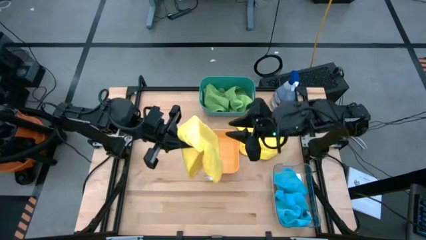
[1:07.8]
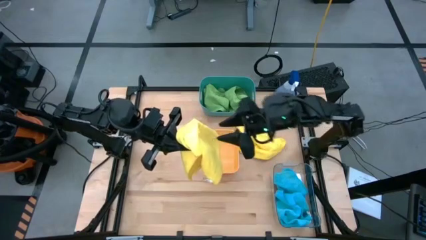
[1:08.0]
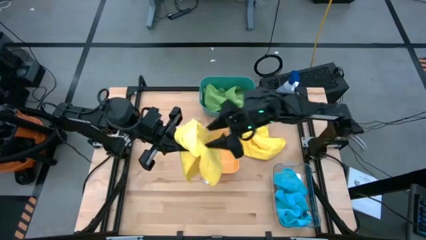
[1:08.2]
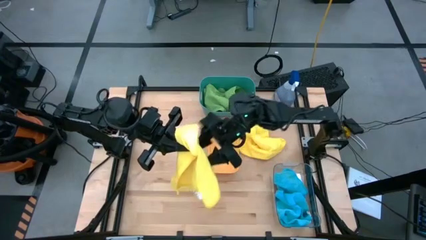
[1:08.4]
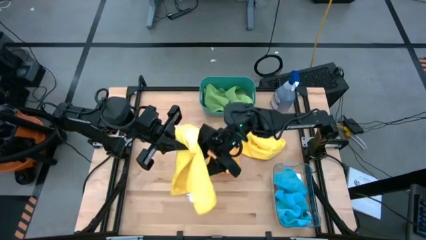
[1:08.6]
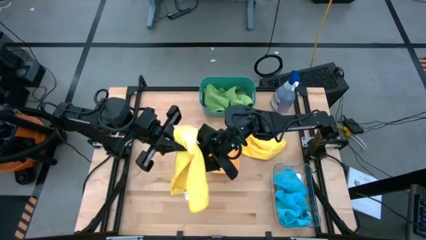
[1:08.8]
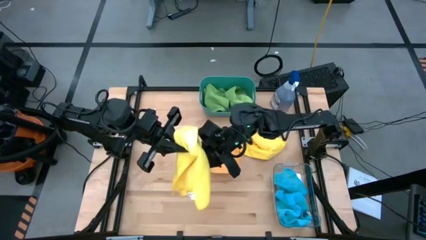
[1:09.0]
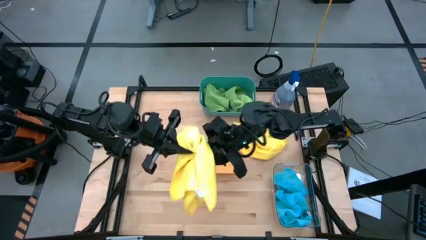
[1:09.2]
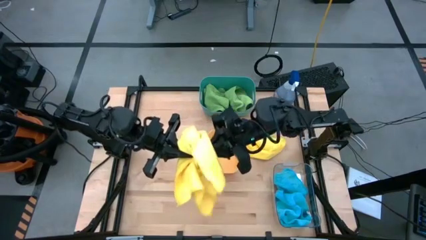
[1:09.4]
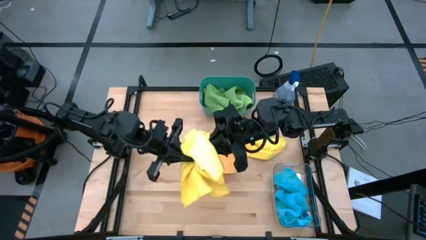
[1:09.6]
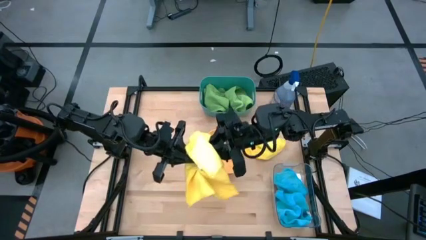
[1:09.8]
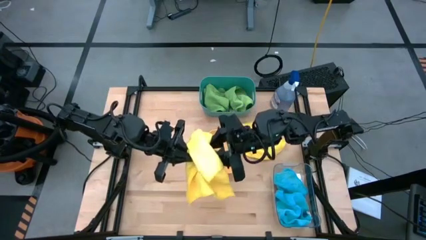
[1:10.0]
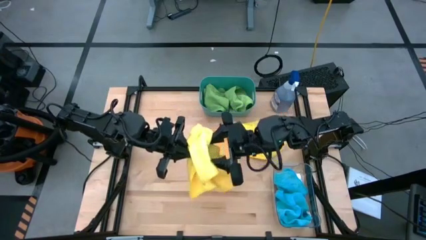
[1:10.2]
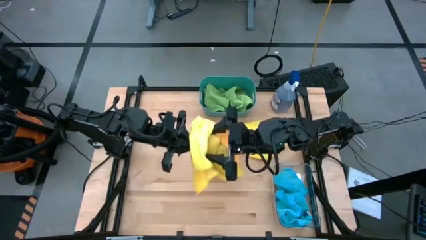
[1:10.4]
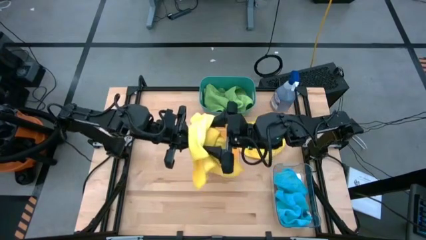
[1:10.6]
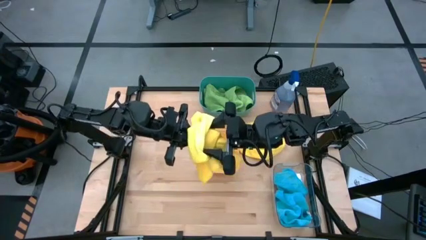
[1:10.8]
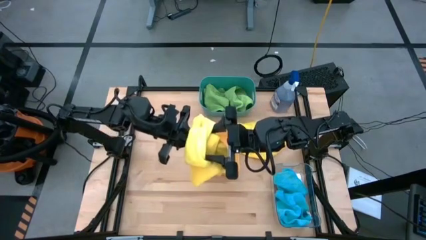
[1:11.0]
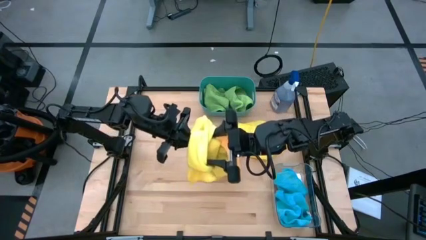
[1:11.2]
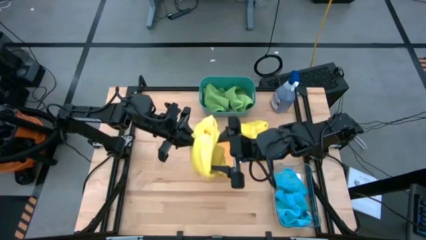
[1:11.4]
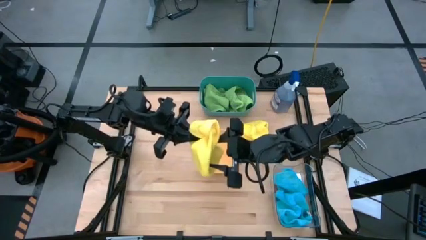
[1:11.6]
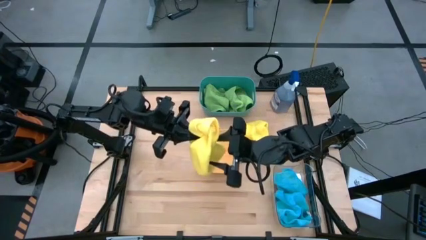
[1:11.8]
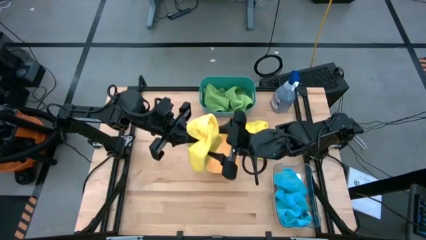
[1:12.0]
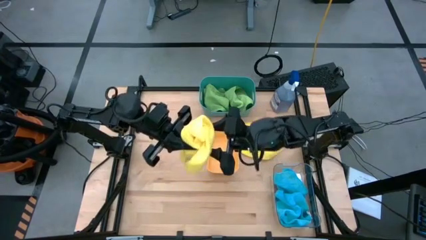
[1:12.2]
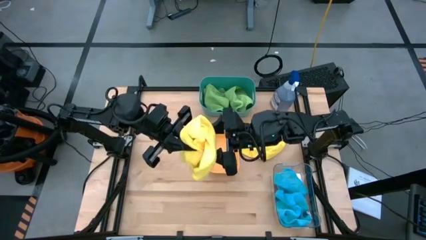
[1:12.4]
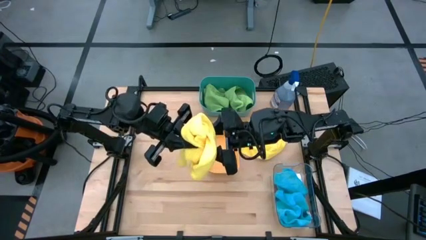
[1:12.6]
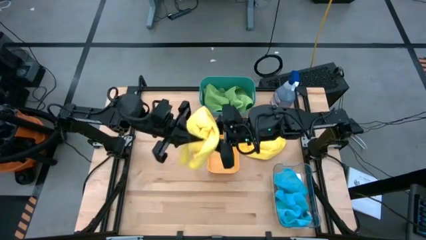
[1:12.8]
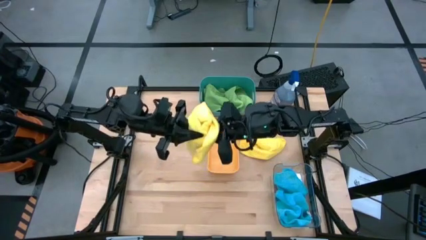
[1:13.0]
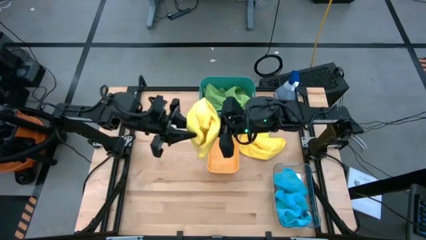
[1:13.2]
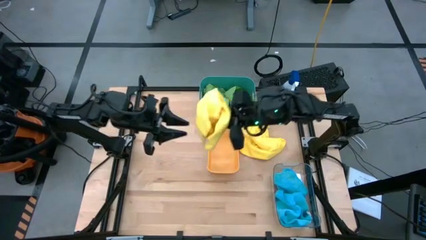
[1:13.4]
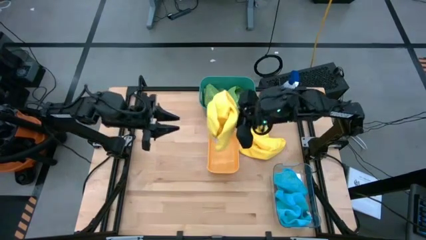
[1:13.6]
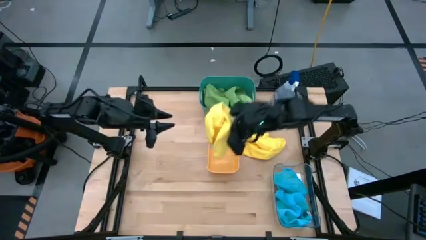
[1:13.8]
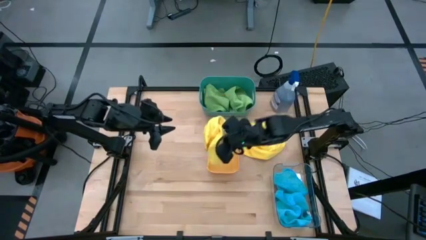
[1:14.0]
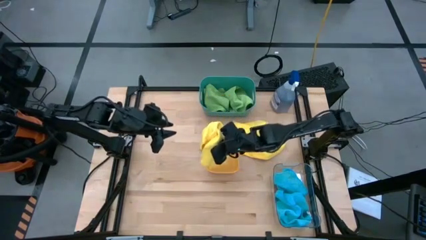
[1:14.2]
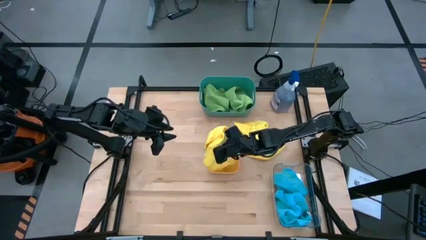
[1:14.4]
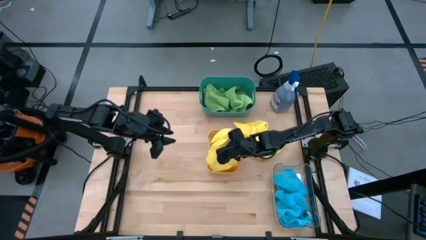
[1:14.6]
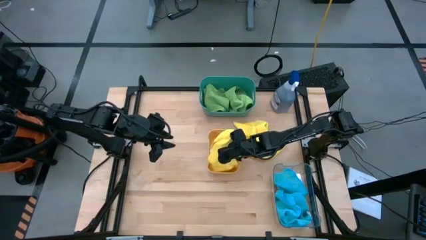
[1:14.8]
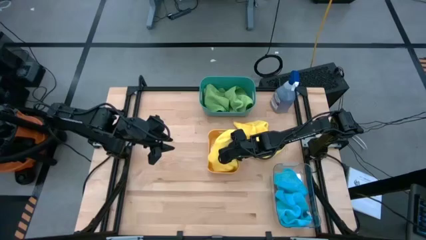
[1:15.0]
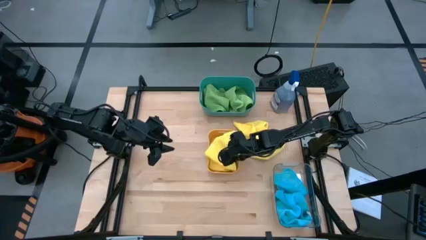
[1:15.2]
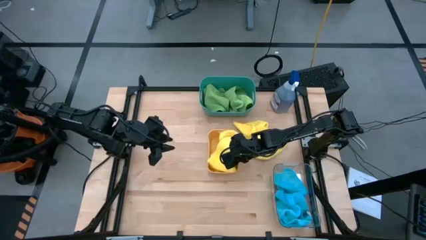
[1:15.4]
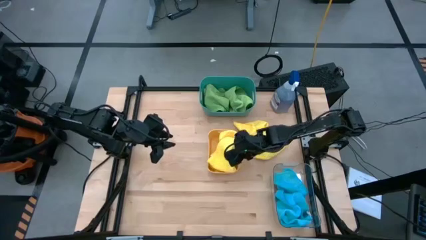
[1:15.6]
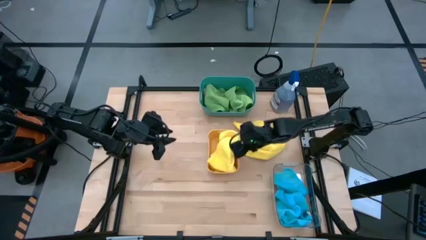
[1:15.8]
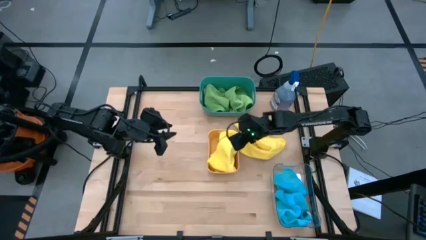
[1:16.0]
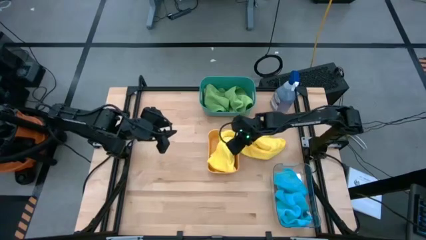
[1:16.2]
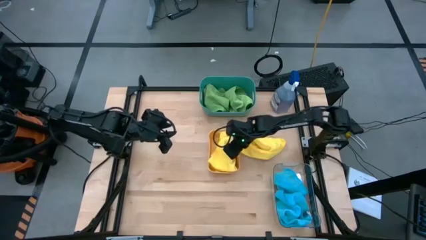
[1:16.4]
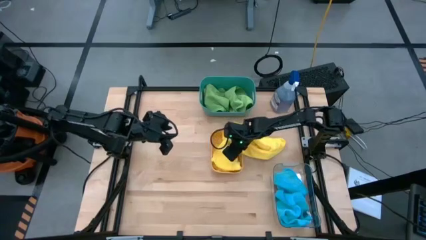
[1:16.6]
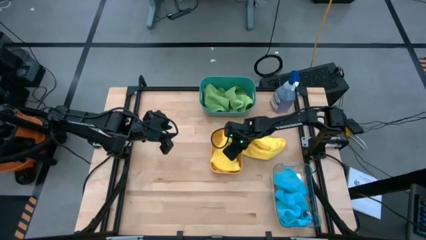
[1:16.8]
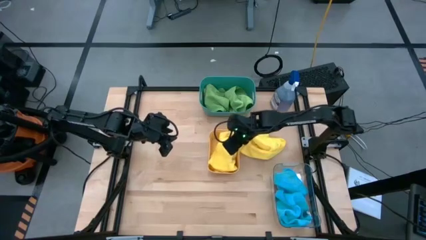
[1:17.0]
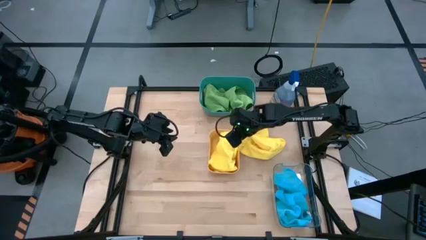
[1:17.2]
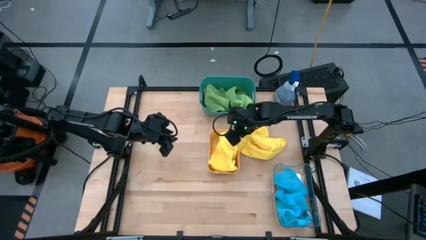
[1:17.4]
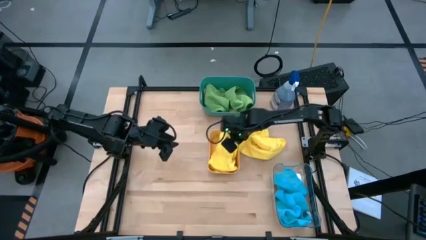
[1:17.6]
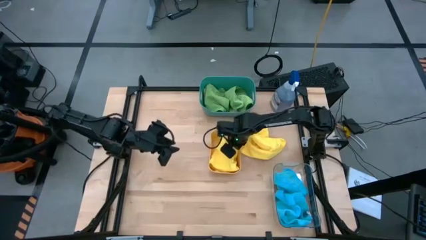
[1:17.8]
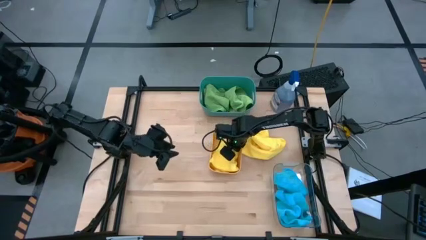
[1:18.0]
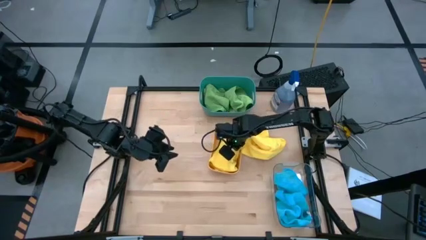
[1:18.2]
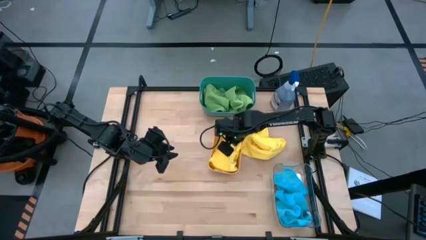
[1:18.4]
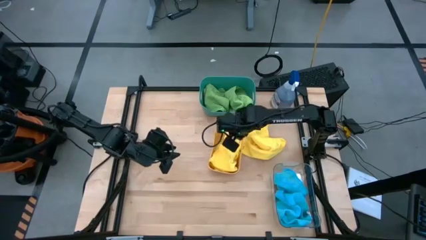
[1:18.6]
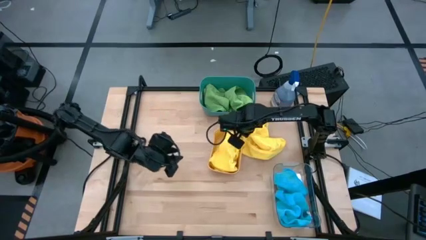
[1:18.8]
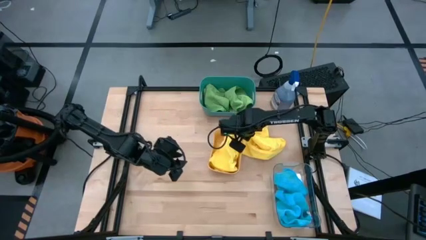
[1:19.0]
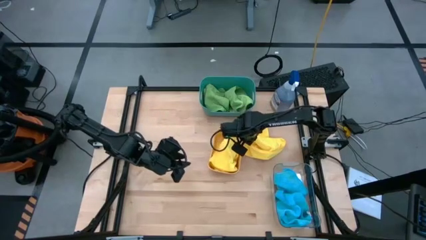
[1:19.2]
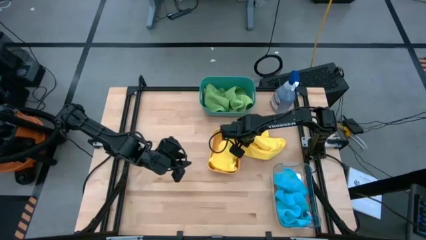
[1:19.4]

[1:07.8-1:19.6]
Task: Sort microfiber towel by color & place in baskets
Put the left yellow microfiber towel into the yellow bin

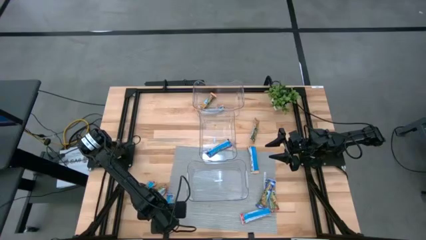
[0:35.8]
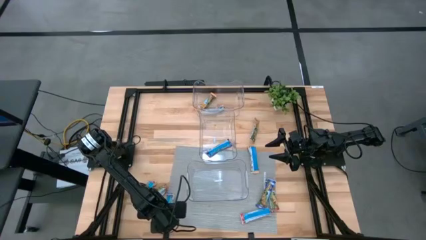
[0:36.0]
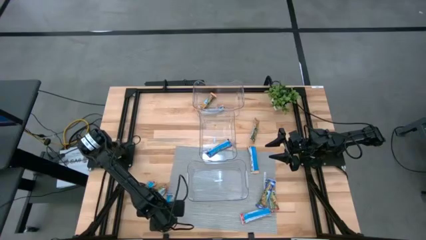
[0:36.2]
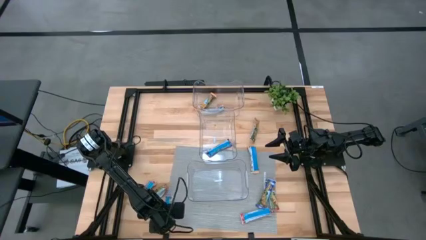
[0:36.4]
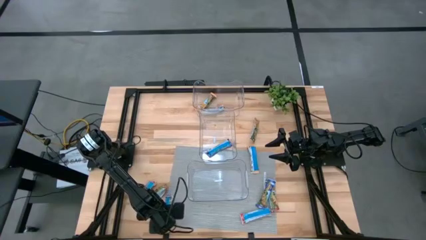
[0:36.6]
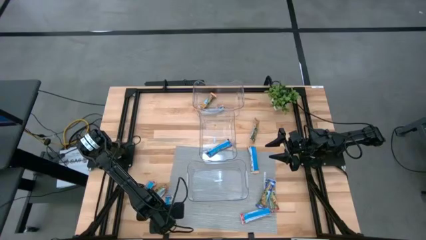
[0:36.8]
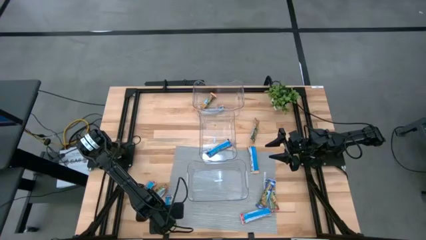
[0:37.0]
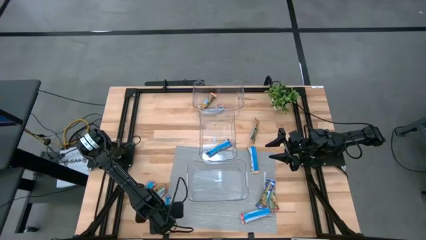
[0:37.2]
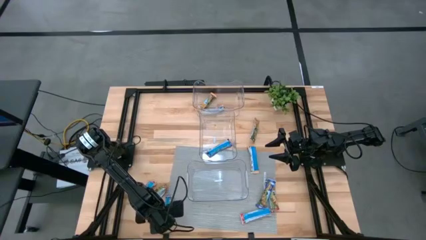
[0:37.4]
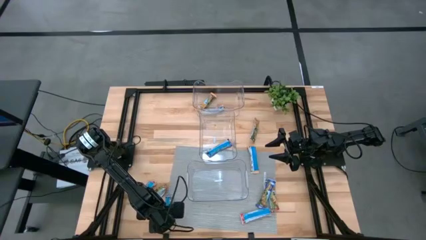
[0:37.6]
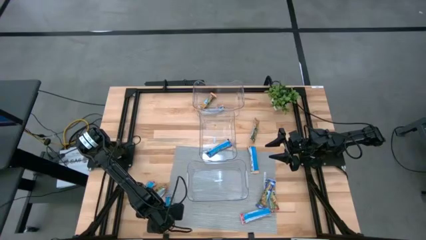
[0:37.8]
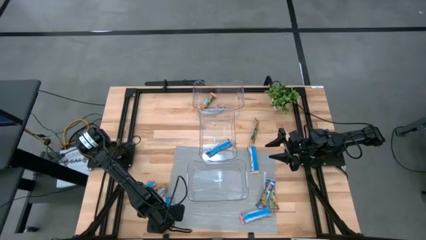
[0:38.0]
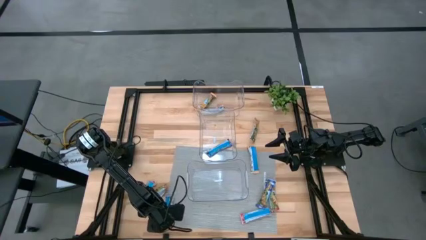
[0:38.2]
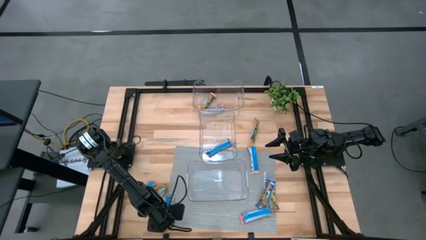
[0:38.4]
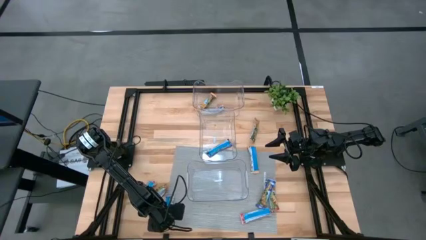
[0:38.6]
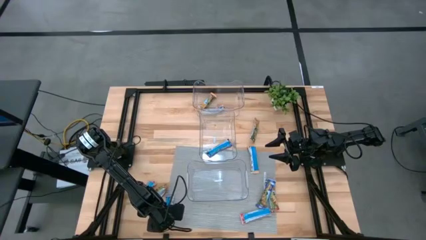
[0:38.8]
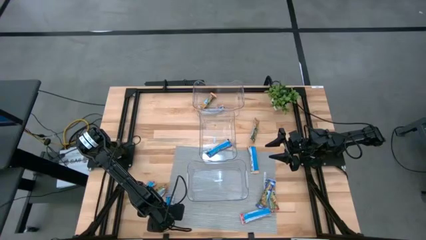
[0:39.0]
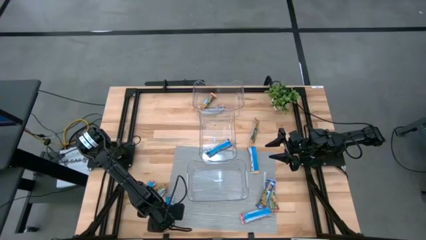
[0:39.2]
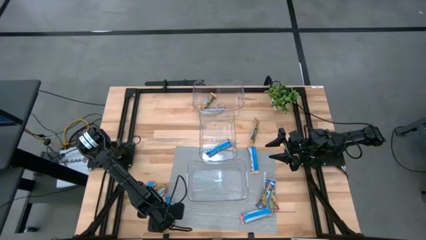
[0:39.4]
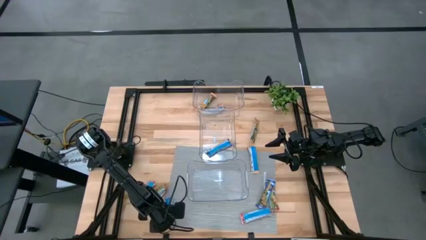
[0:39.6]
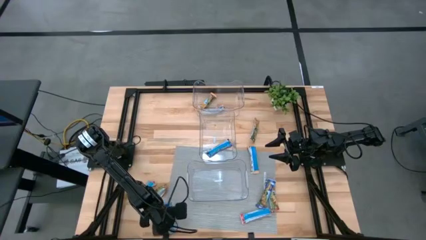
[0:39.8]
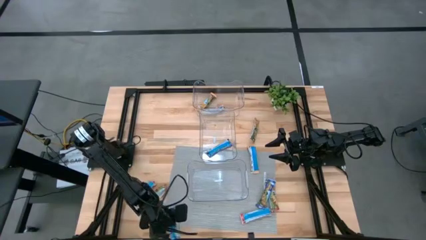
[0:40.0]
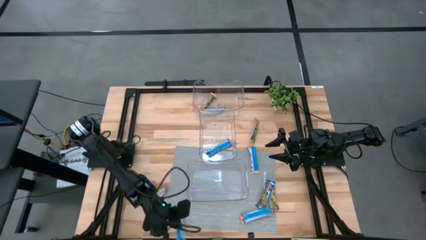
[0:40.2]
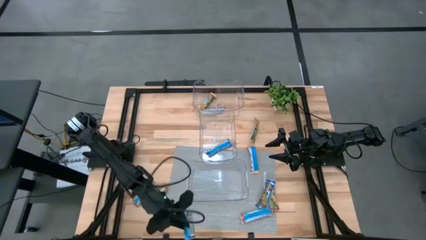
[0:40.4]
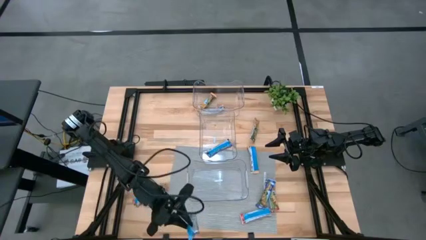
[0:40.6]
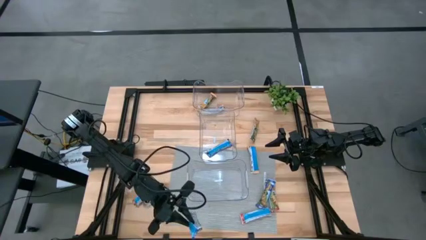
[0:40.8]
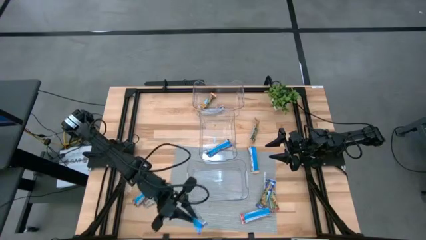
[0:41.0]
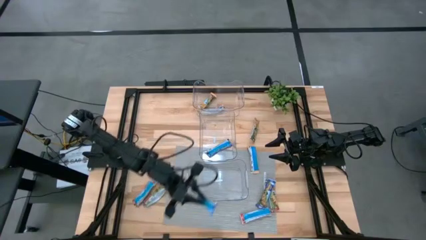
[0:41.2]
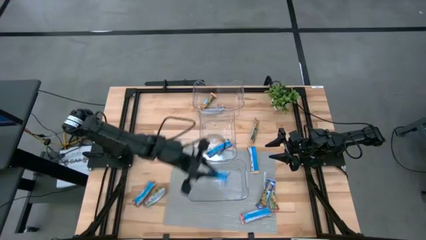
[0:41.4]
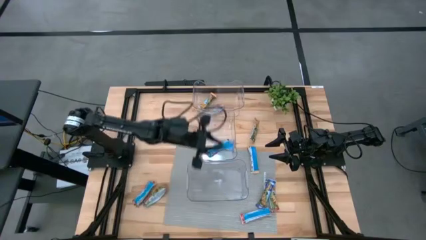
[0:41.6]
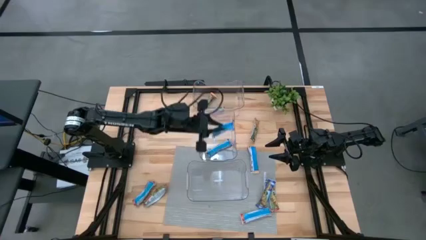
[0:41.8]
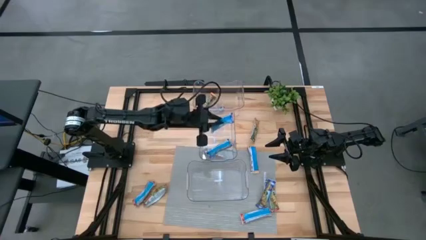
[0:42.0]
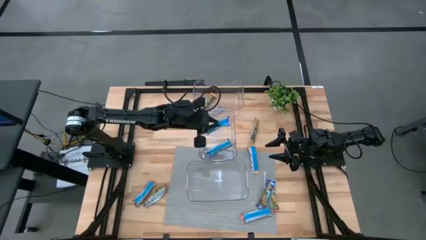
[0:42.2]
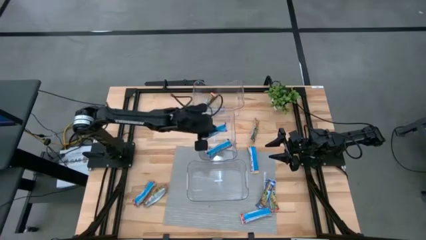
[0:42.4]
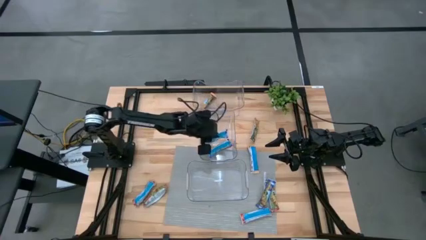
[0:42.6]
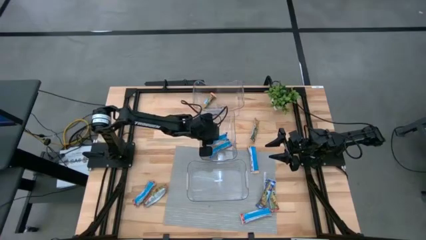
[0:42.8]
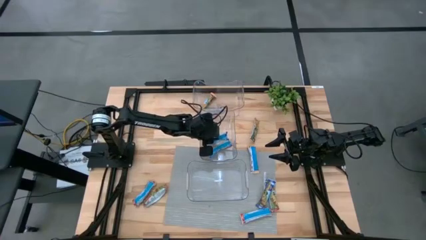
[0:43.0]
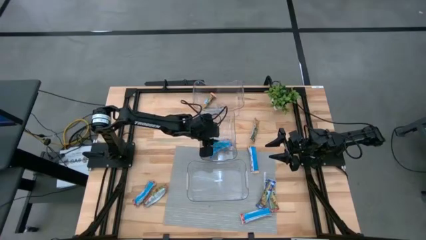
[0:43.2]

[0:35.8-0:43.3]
Task: Pick and place Granola Bars by type
Put the blue granola bar into the middle transparent bin
